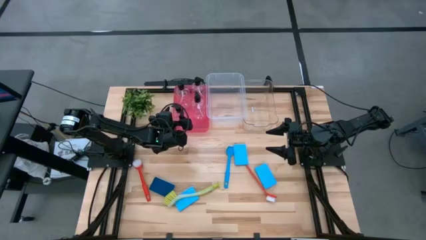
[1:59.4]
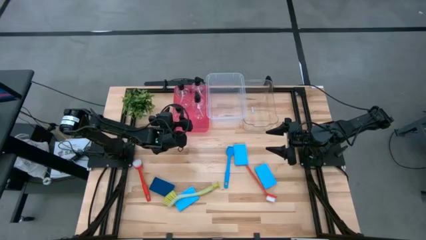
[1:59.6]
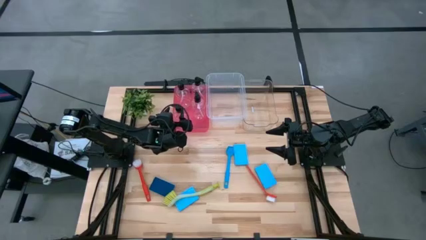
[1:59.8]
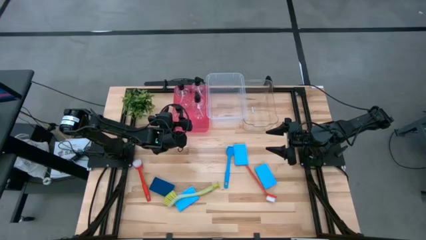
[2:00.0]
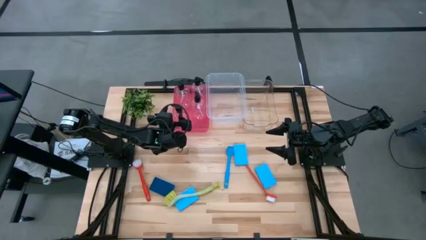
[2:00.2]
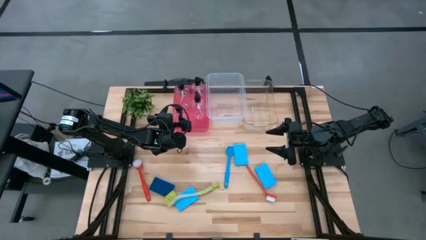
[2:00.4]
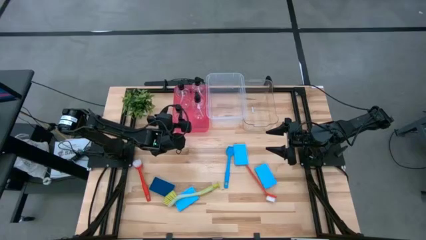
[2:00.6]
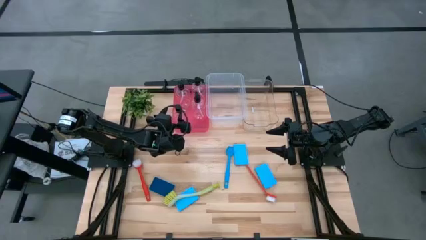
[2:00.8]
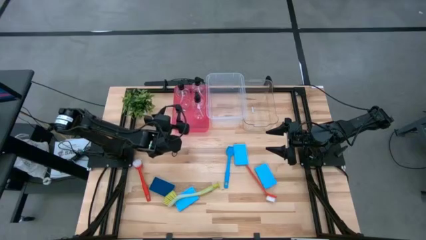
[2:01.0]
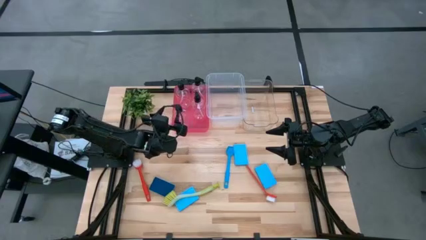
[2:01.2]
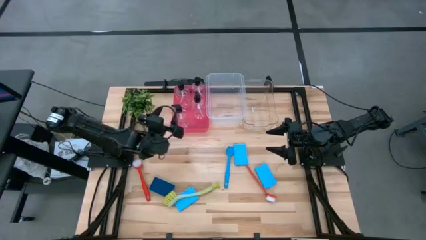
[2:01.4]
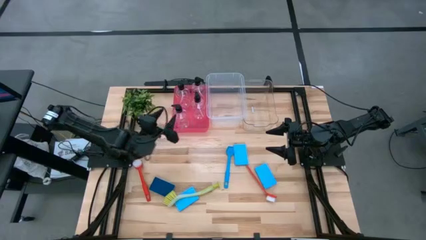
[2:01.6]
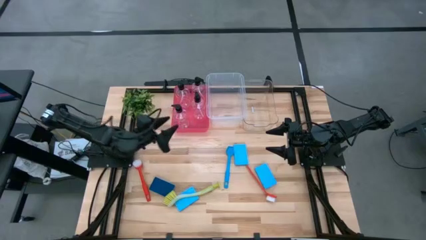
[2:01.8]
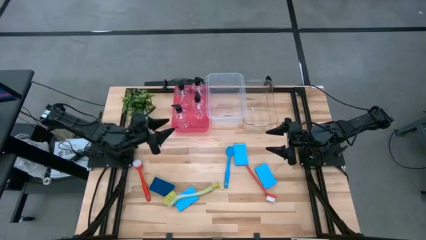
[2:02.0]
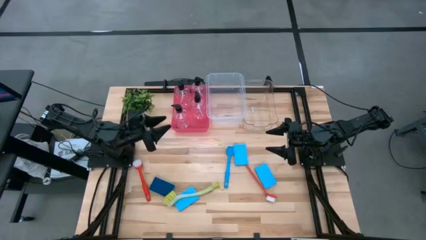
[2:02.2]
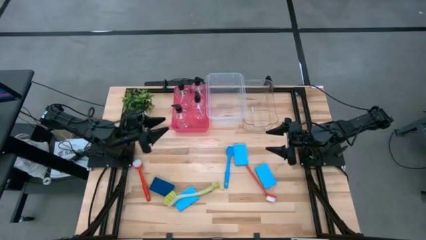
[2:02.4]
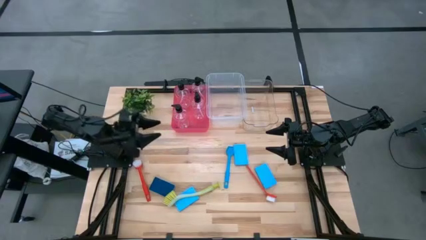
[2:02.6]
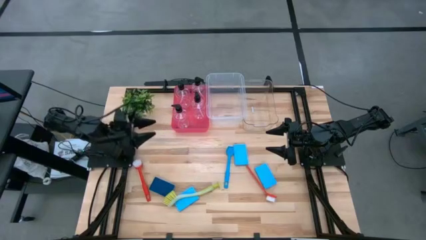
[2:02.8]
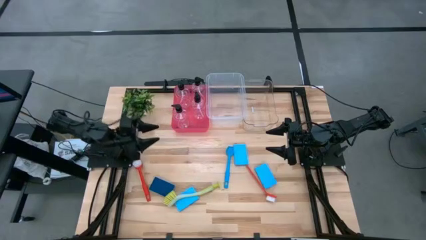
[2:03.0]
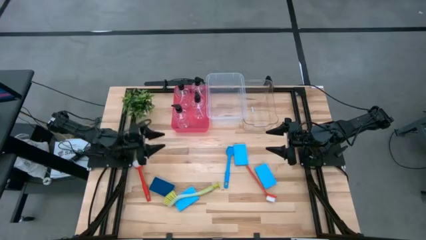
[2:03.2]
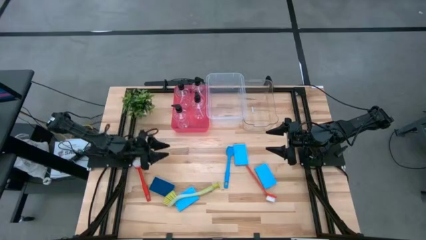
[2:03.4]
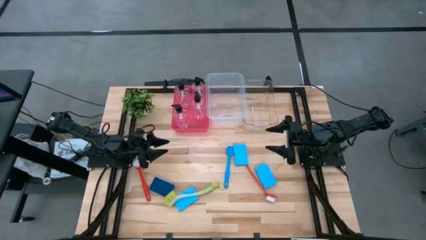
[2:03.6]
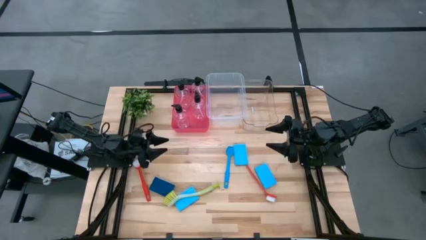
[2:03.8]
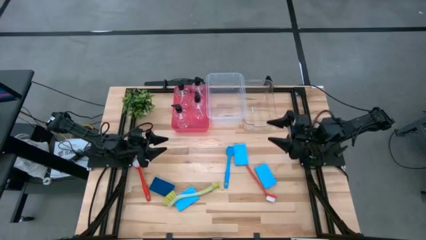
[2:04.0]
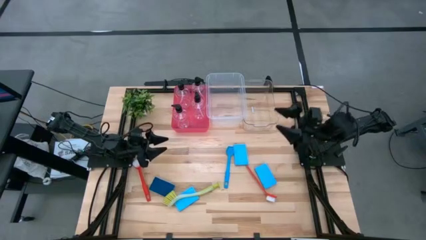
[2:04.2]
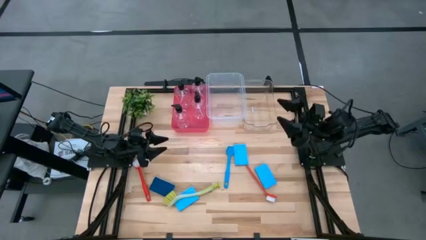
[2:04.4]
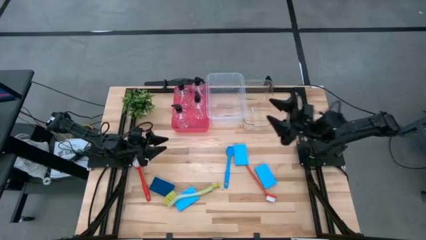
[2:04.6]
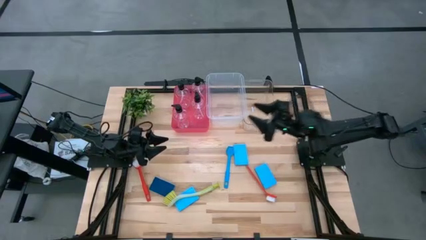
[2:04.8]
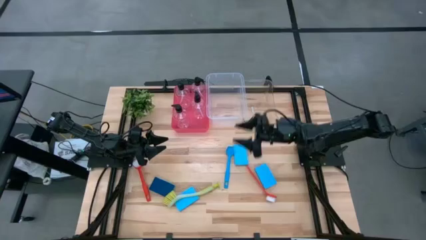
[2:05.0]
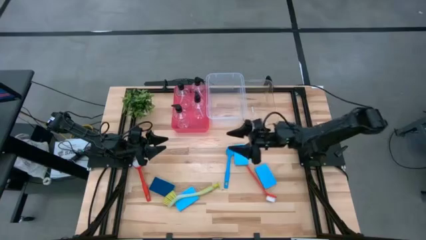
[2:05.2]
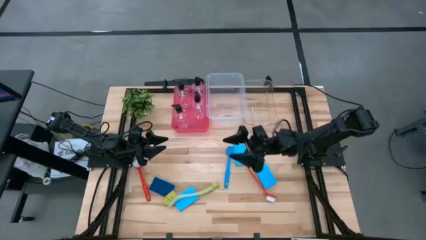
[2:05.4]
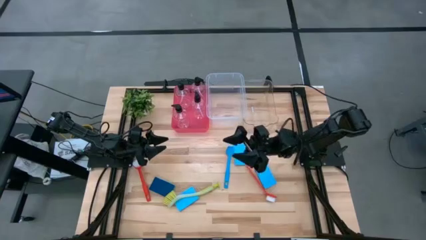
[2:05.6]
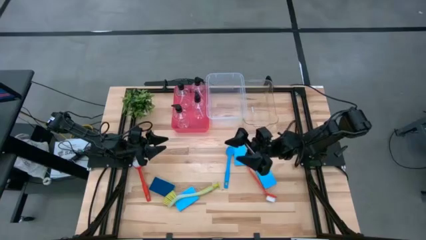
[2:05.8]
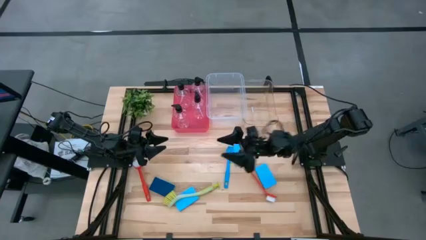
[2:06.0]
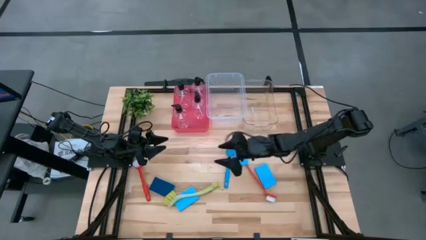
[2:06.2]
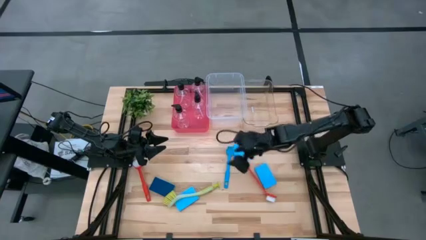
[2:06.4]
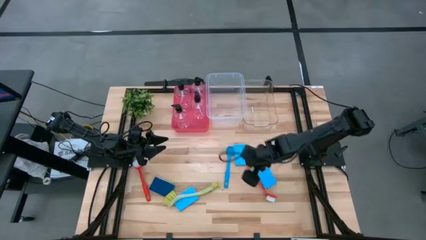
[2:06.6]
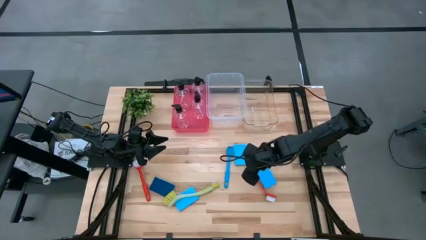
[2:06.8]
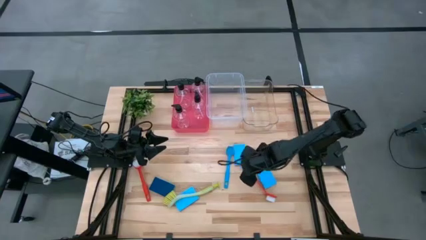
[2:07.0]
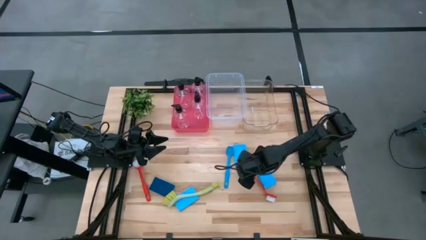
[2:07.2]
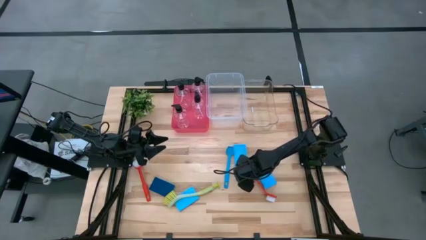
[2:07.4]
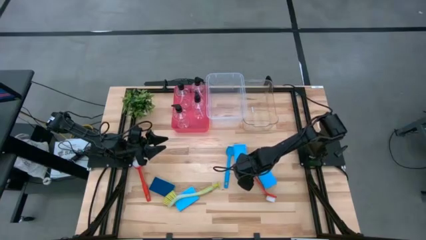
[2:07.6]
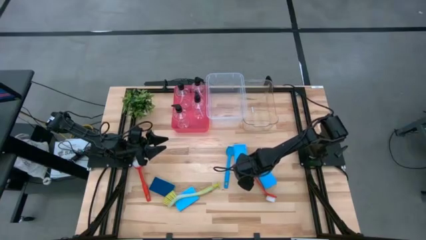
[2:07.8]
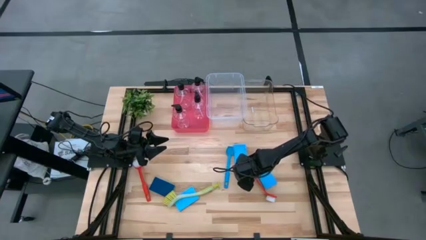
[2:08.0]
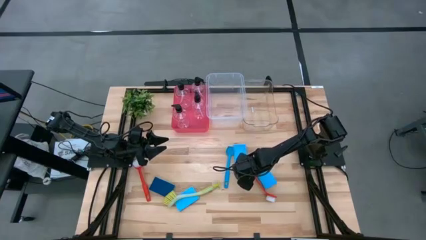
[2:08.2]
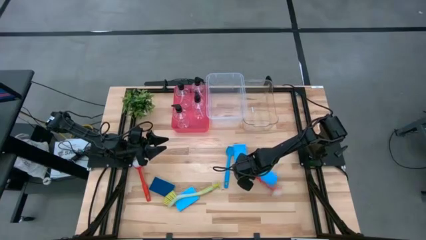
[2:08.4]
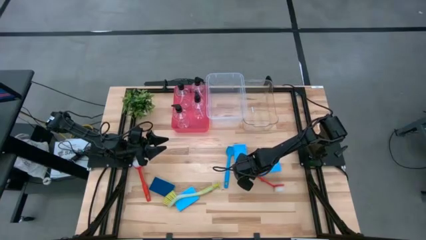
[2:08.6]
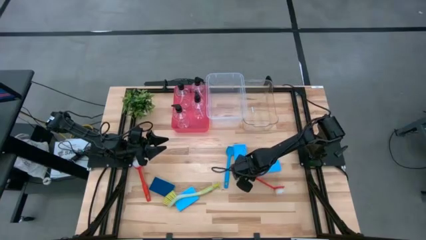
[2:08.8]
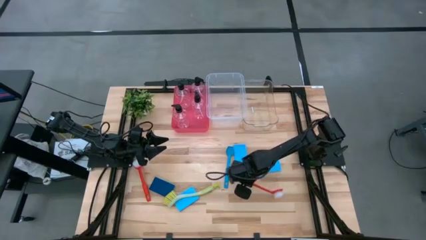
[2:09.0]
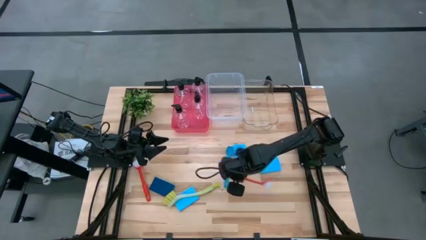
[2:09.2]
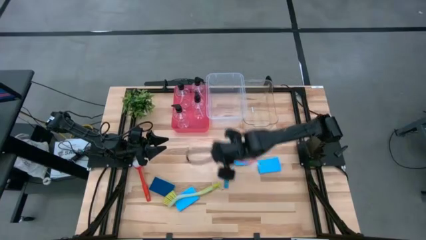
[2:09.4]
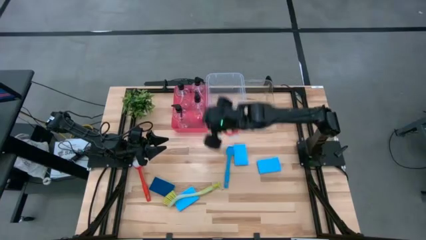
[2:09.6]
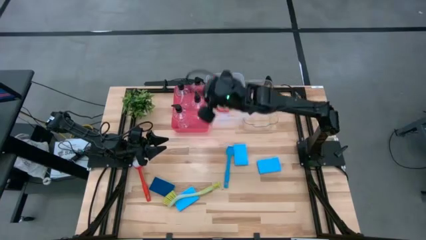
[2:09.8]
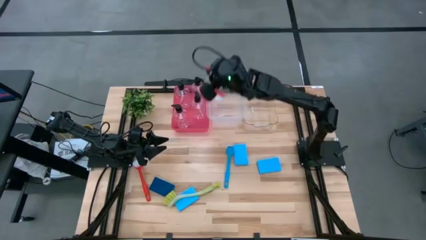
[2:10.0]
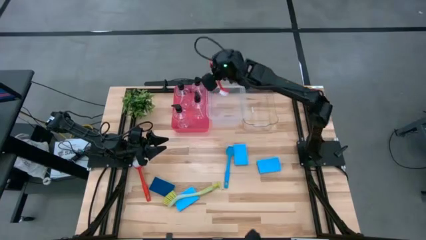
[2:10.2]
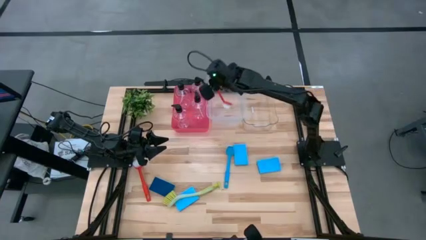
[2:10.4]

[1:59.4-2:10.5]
Task: Pick & Place Kitchen Sink Supplies
Put the right red dishwashing brush into the transparent white bin

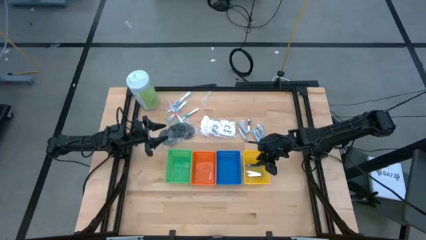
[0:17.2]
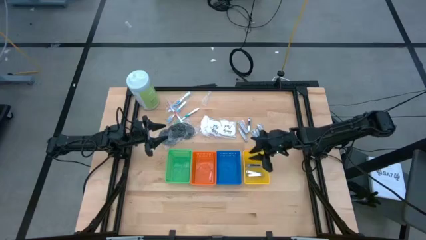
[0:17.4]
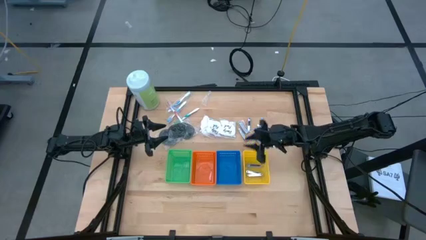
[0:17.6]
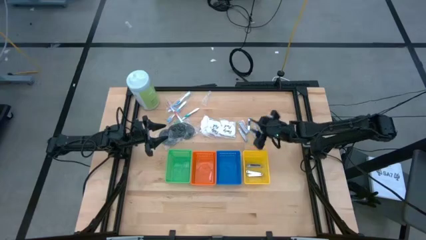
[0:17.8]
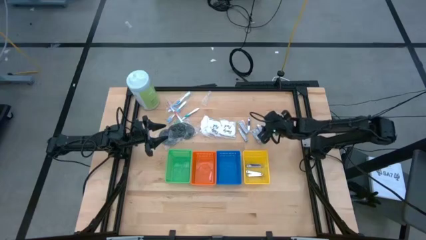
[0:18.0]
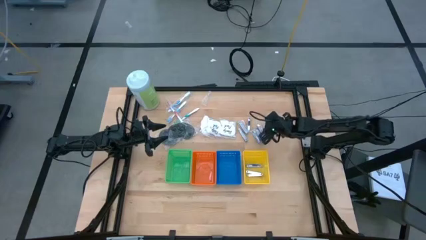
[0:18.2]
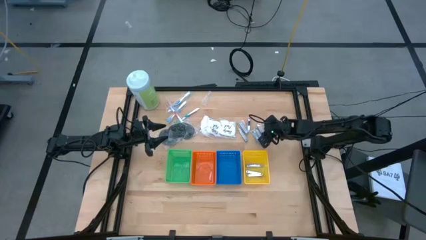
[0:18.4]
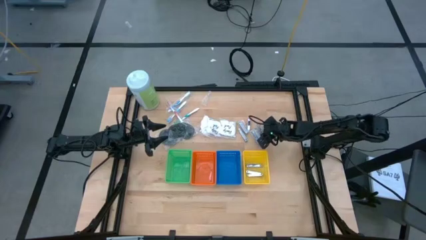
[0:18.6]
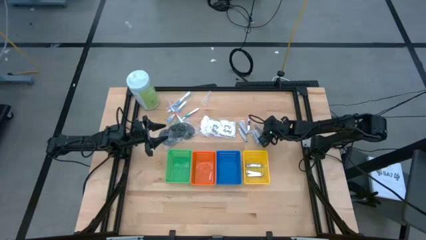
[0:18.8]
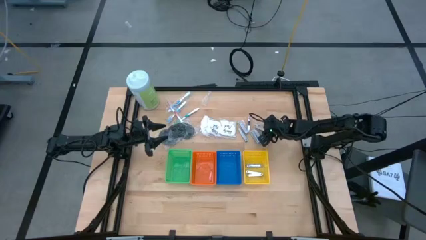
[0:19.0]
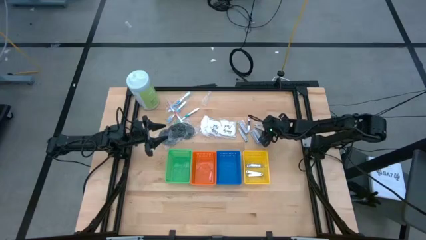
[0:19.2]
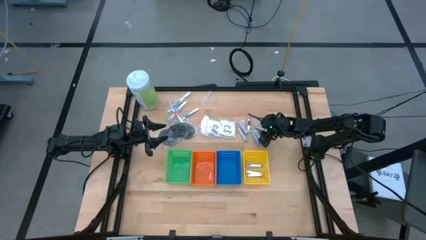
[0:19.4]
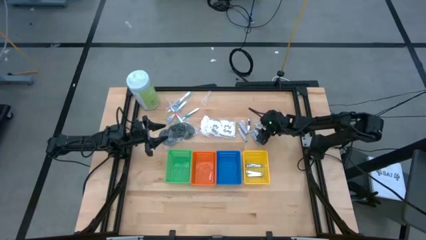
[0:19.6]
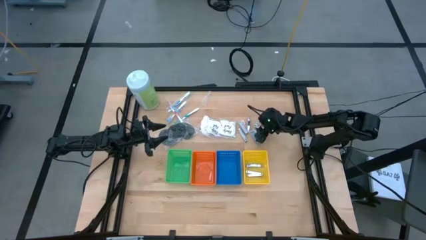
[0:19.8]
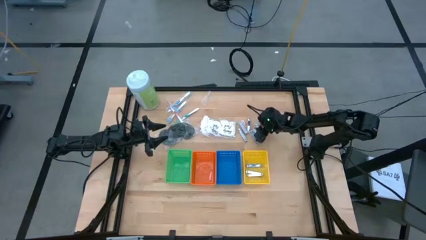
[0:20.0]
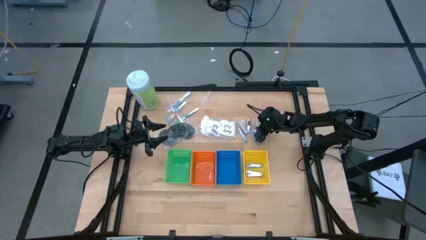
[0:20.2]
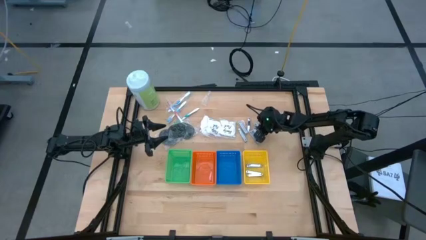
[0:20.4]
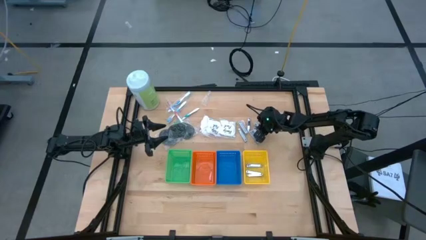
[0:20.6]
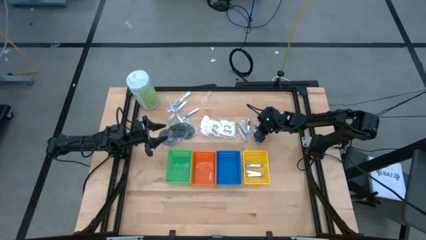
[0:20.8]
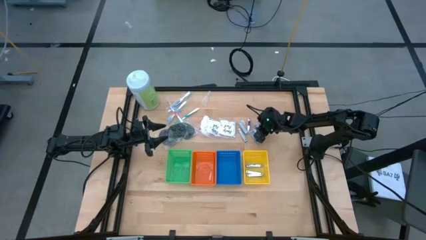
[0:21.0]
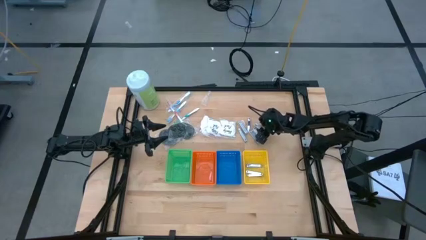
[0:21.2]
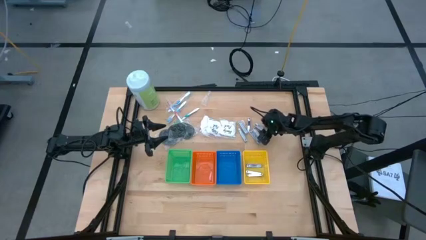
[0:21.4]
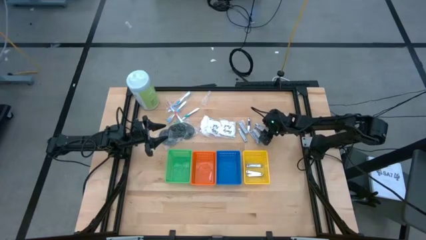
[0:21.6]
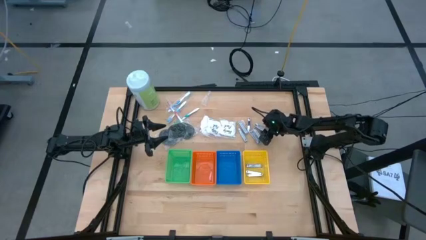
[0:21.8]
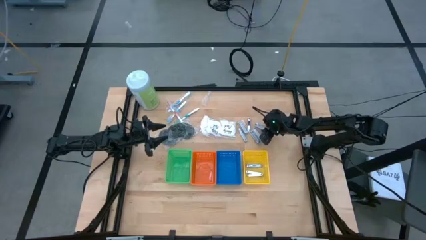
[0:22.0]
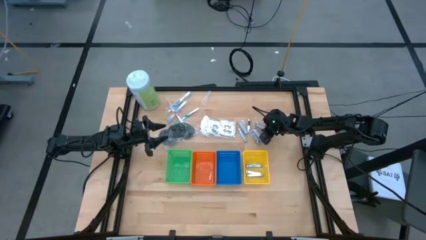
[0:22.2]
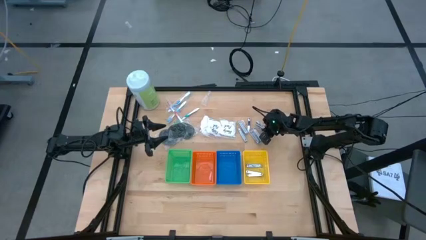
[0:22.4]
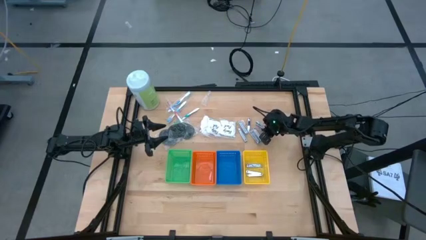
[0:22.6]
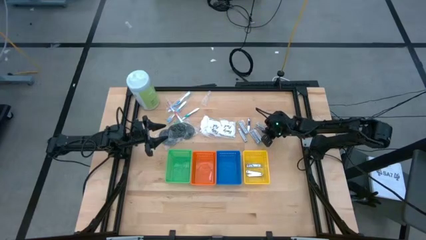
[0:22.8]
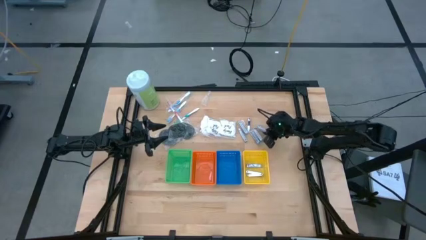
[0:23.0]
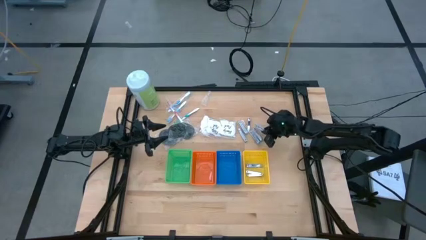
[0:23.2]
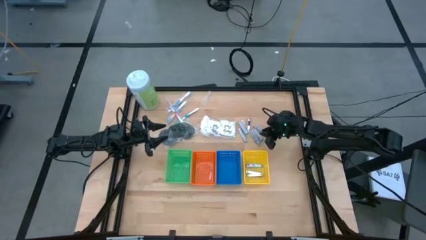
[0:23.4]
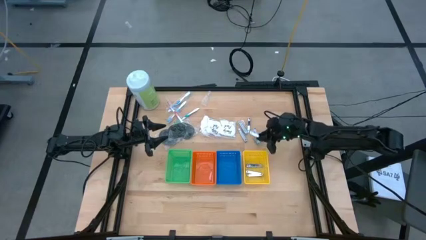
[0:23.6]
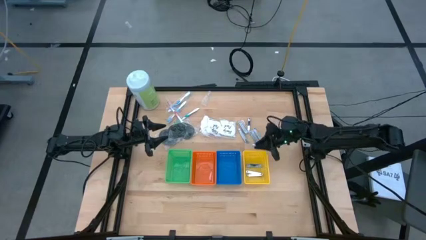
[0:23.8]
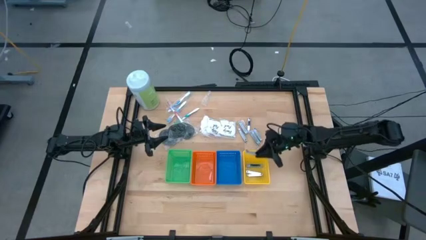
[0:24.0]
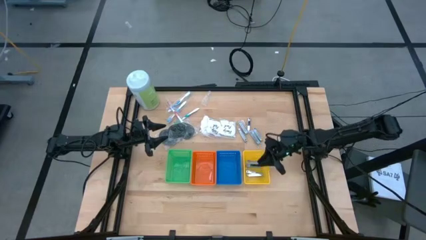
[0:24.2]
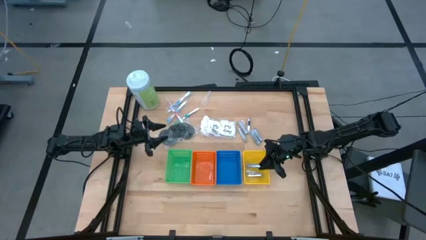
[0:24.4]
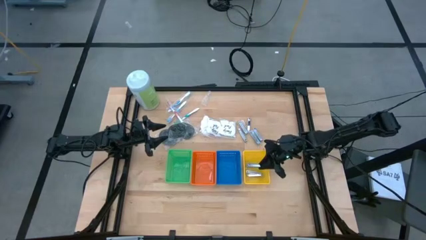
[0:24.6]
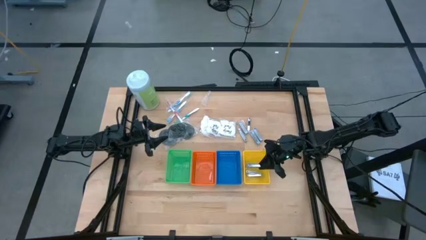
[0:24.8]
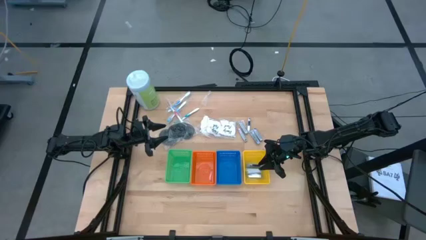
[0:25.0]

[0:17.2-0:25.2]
Task: Pick & Place Travel size toiletries
Put the silver nail cutter into the yellow basket
